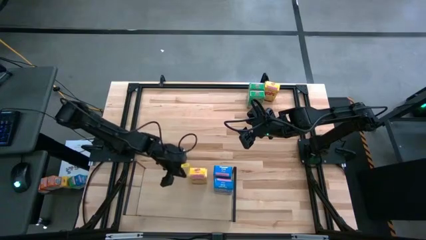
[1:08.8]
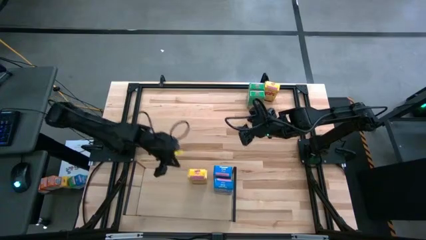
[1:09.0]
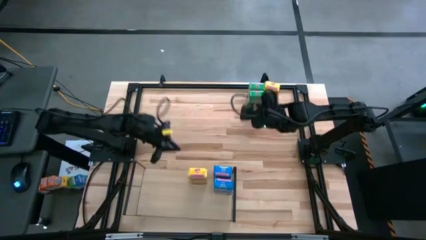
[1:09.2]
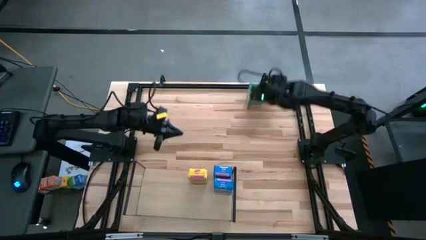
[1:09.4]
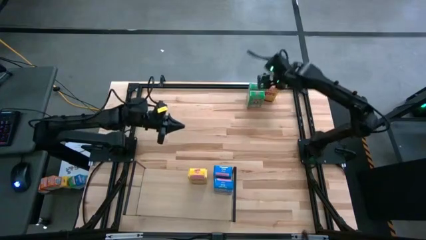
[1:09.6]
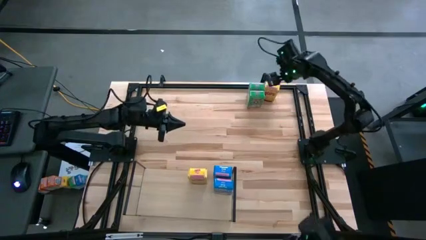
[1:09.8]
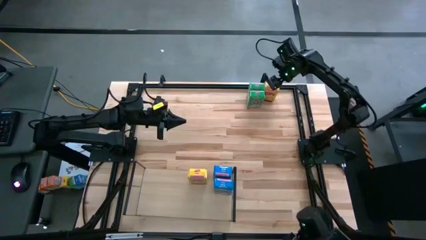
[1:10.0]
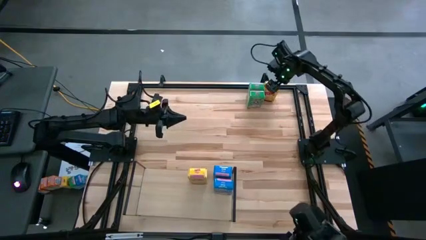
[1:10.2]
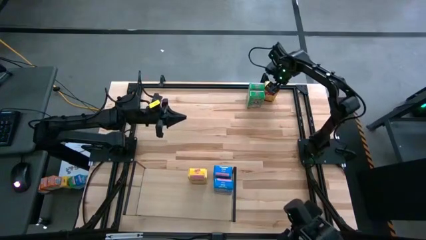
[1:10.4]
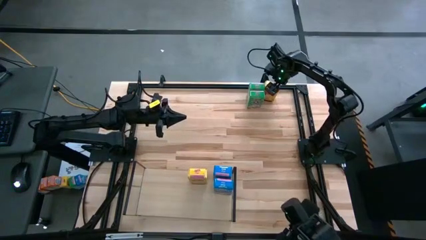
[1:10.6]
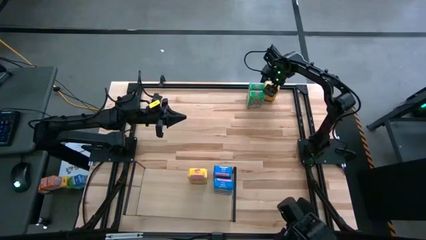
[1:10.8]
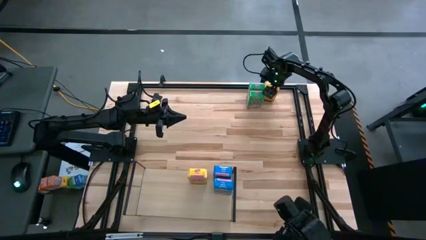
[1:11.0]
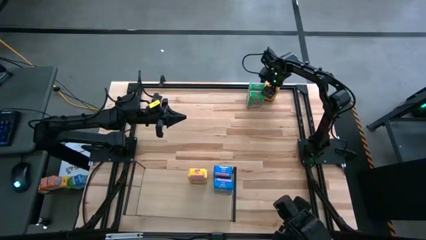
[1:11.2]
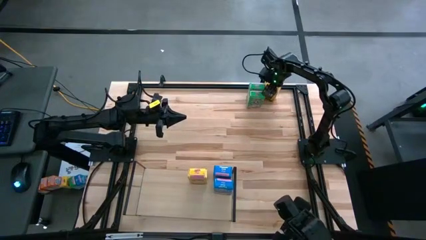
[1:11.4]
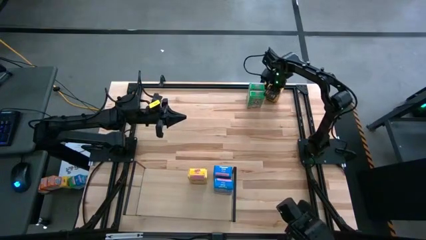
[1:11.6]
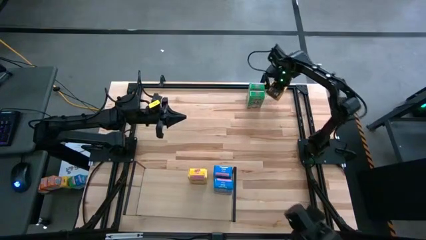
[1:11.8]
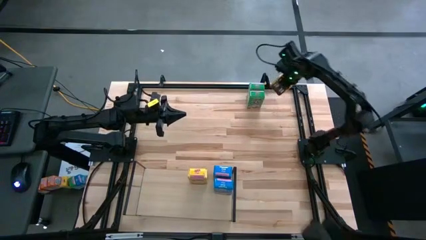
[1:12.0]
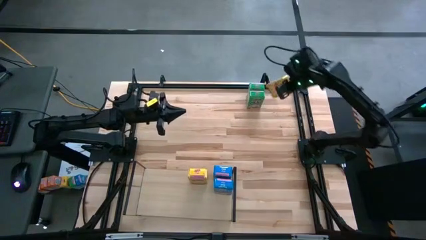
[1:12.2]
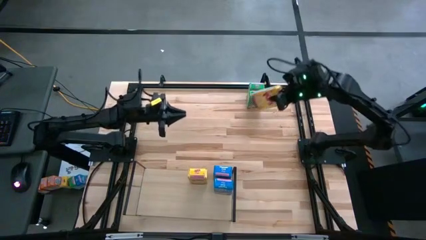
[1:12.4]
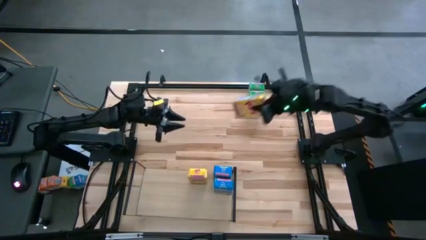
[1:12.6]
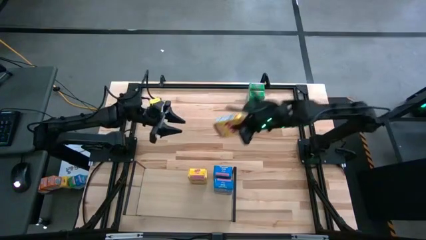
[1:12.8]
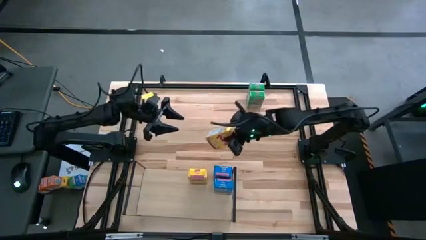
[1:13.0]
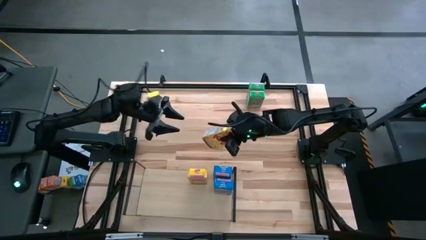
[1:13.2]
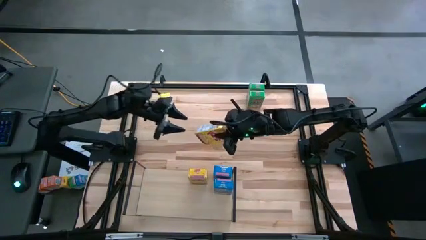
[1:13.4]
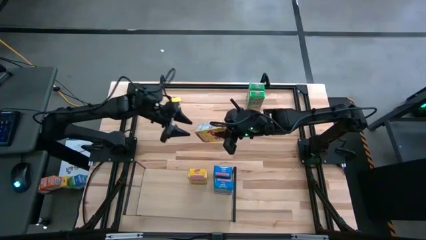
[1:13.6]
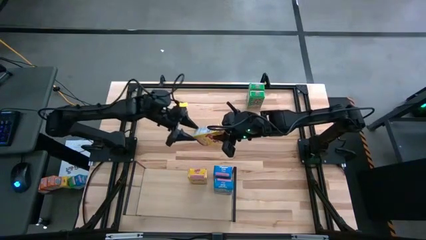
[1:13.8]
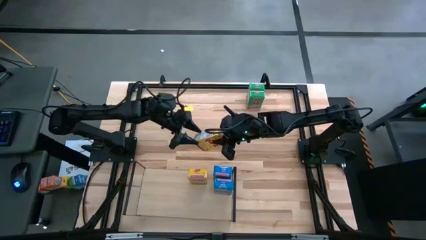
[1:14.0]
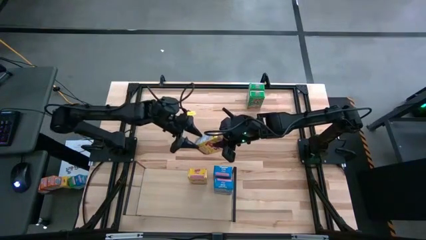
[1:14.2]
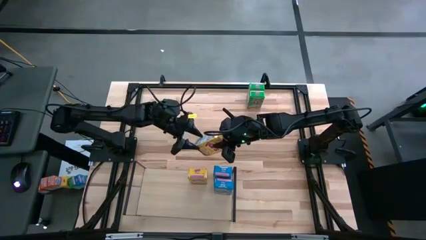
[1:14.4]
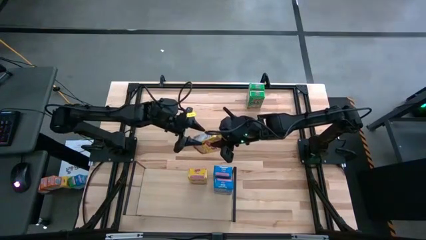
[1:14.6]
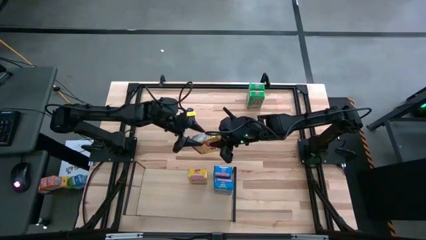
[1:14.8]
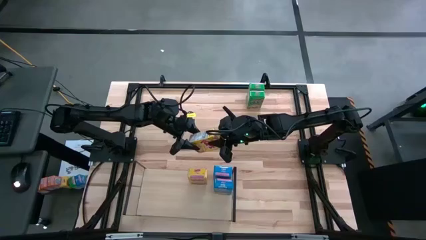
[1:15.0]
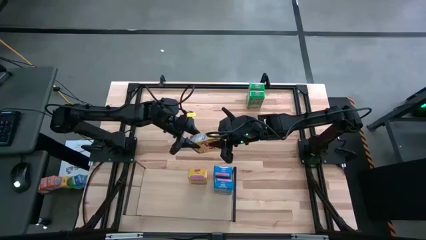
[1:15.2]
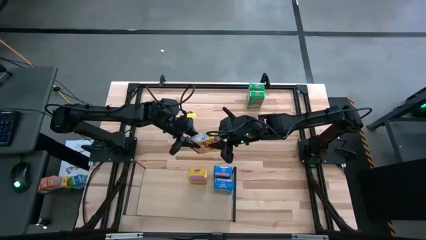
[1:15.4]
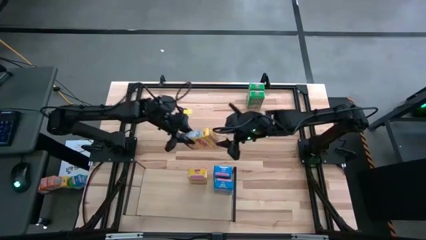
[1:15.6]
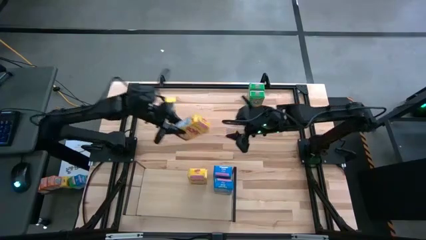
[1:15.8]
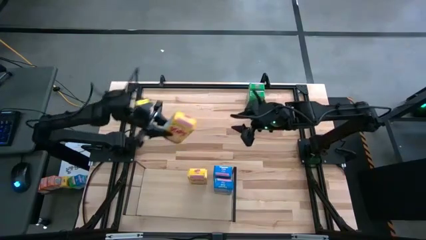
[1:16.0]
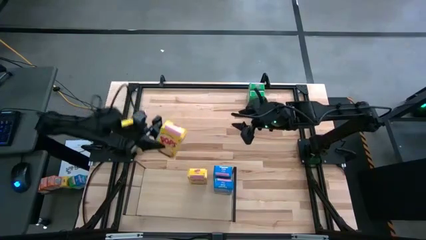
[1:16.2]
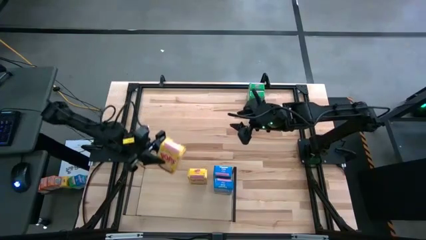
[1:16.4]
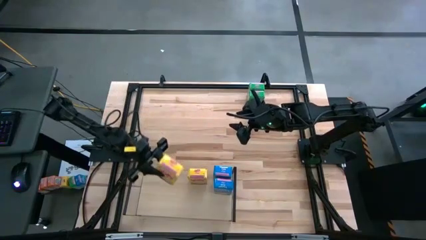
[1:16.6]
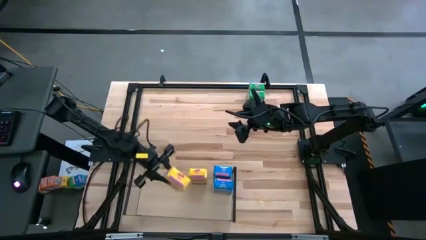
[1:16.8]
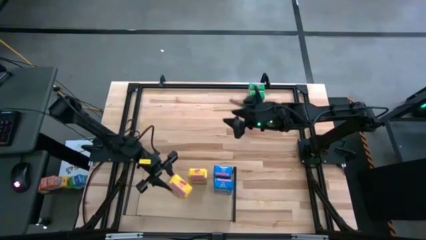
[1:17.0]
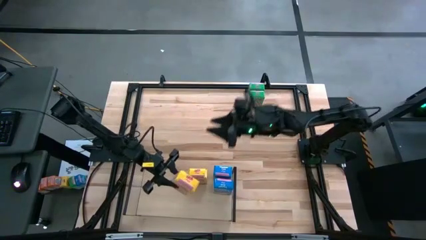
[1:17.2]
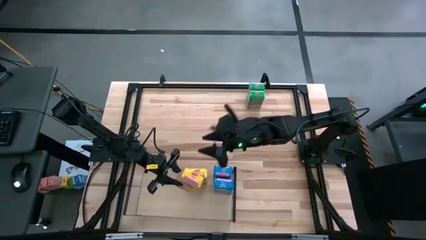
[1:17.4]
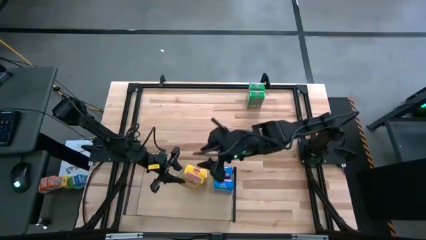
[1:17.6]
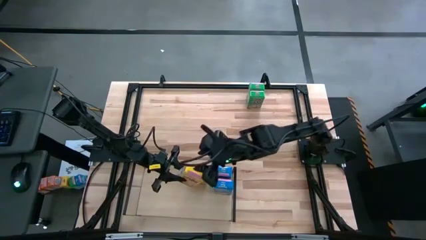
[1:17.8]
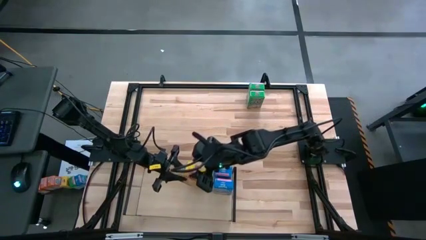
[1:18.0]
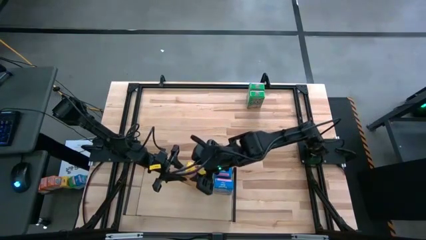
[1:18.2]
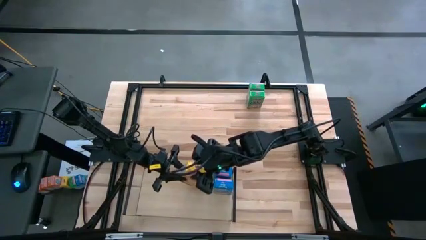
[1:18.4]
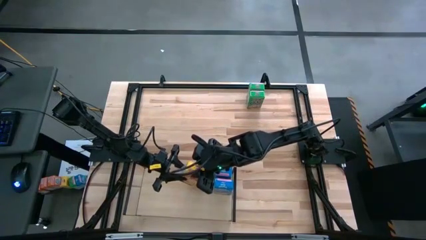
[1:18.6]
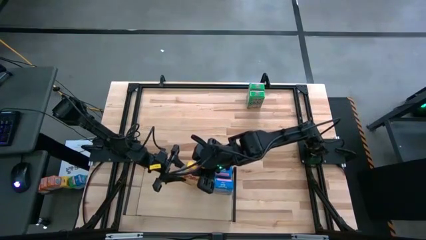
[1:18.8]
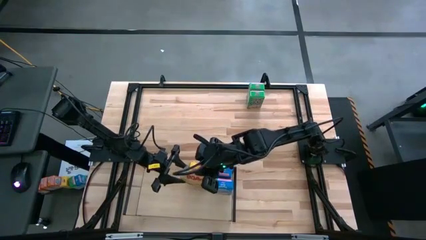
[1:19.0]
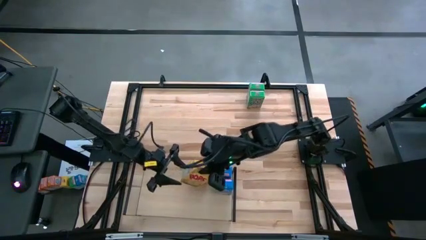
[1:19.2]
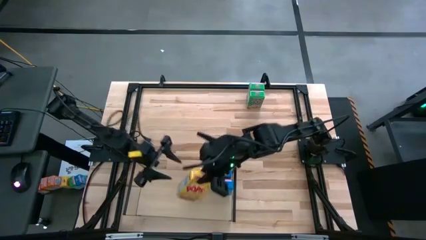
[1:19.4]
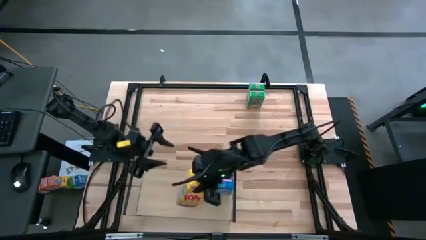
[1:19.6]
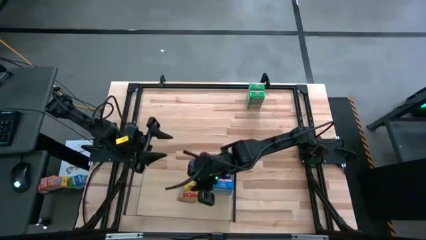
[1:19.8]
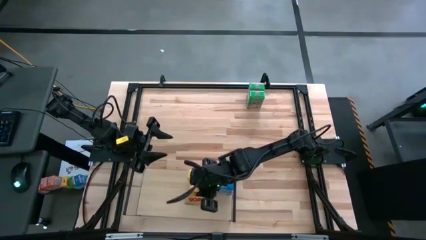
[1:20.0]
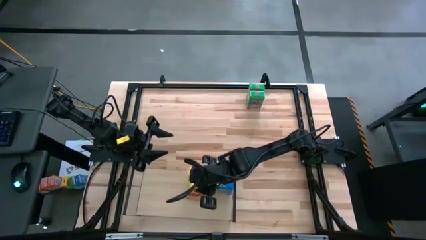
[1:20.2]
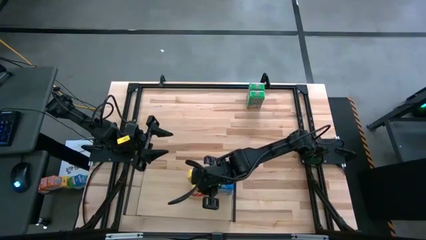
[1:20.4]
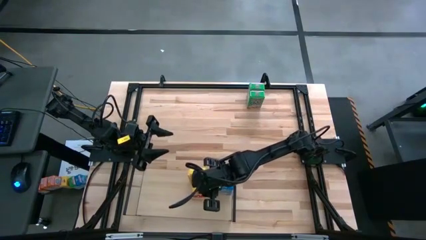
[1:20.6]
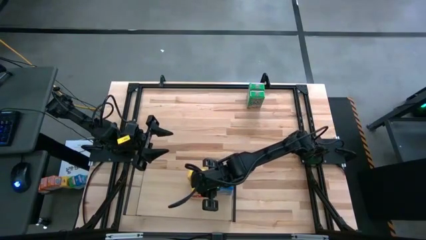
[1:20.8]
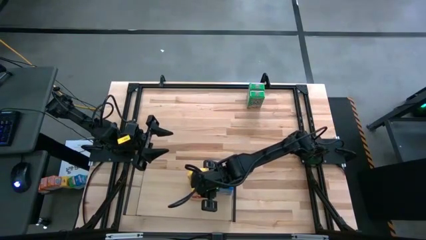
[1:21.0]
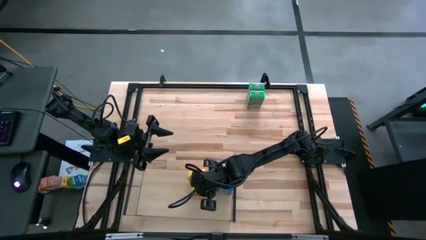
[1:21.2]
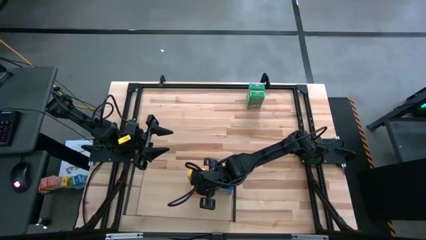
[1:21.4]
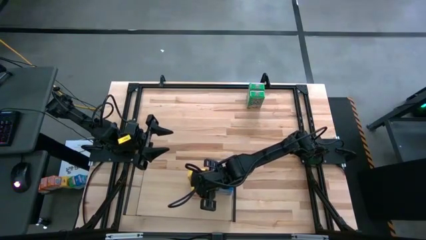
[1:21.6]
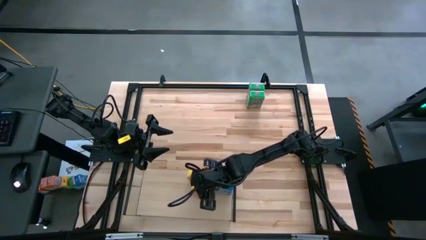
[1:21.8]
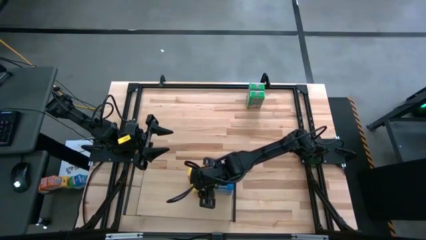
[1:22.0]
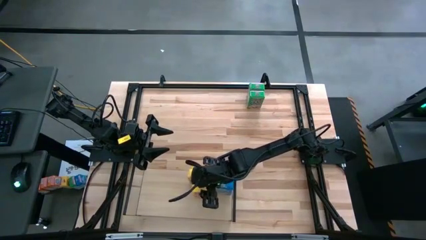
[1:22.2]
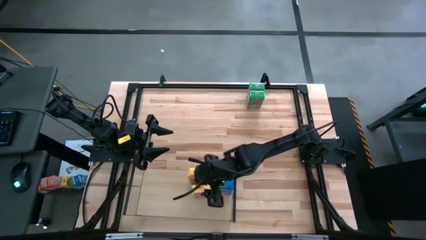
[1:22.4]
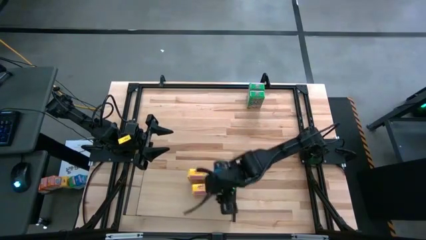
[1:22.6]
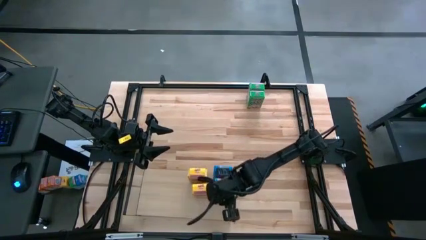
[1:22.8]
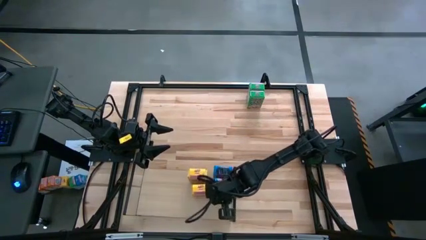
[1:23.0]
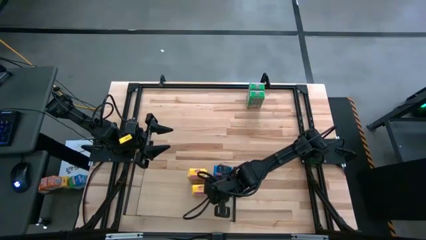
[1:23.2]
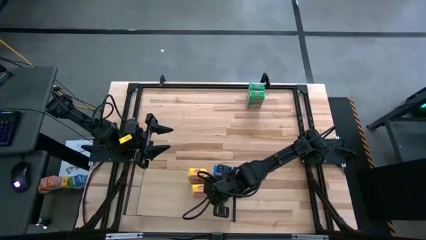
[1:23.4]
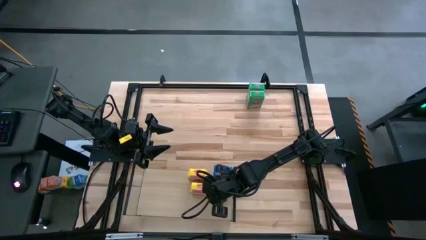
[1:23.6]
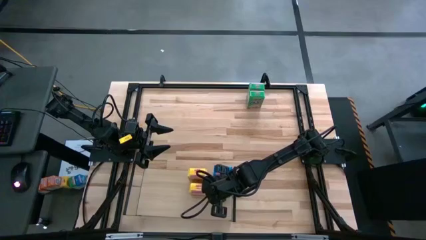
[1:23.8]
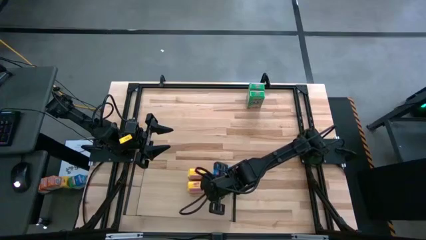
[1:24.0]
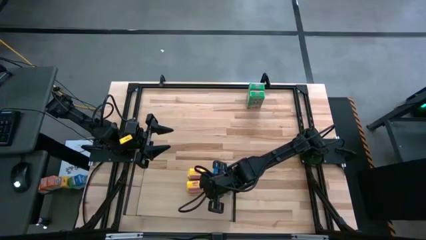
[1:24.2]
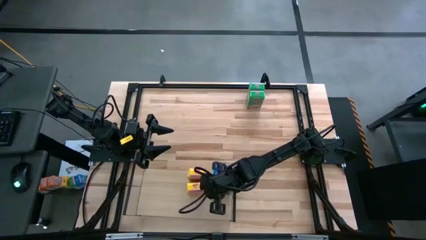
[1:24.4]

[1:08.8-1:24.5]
Task: Stack cereal on shelf
Put the yellow cereal box on the shelf aligned with the yellow cereal box
